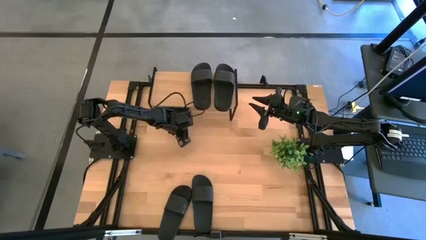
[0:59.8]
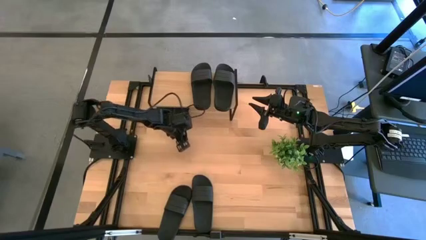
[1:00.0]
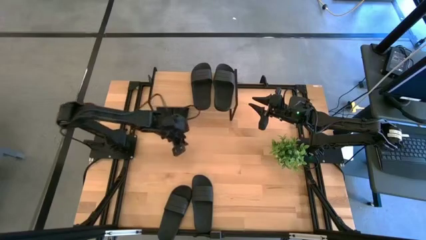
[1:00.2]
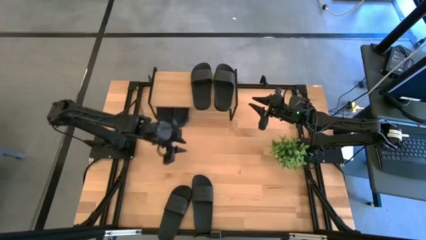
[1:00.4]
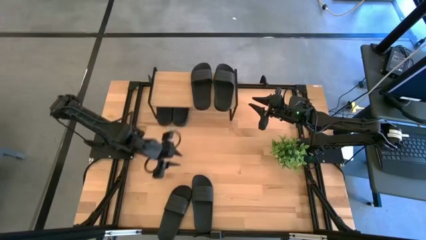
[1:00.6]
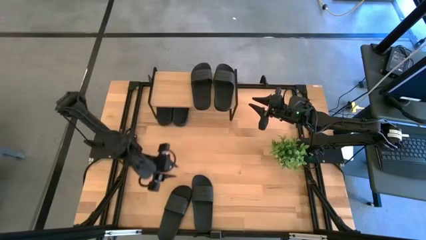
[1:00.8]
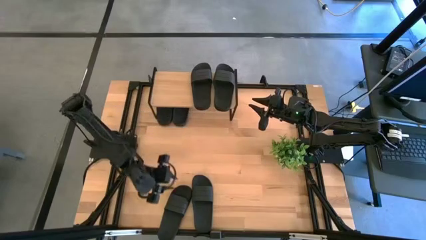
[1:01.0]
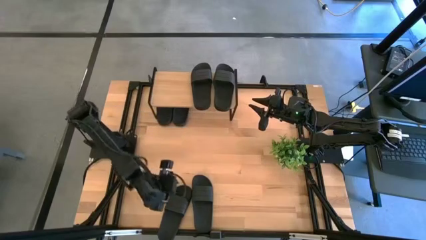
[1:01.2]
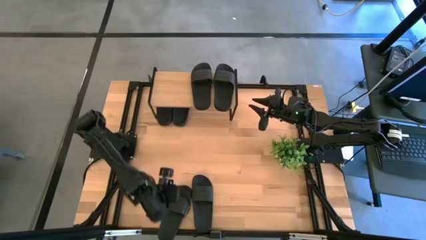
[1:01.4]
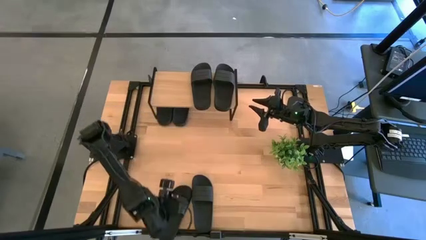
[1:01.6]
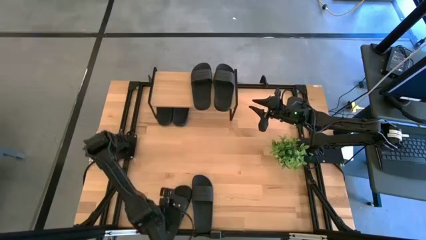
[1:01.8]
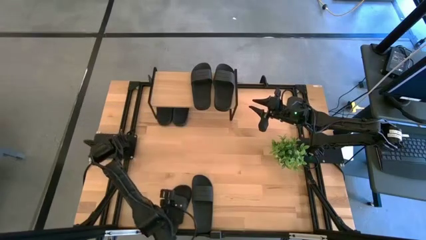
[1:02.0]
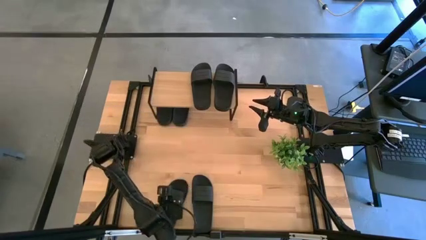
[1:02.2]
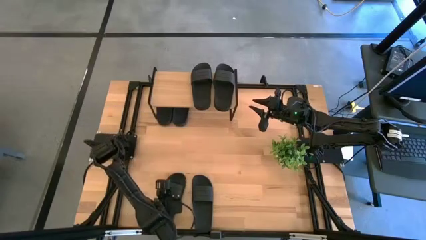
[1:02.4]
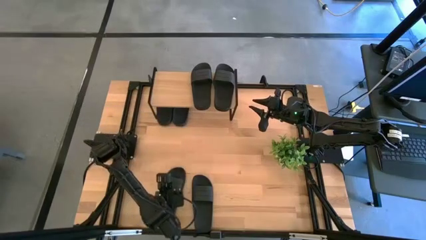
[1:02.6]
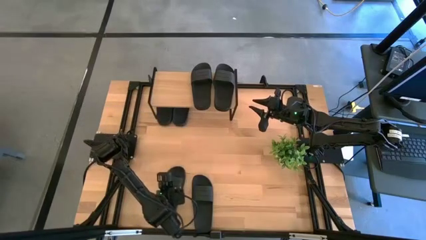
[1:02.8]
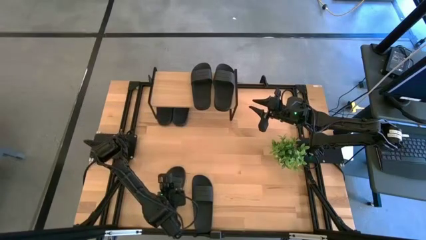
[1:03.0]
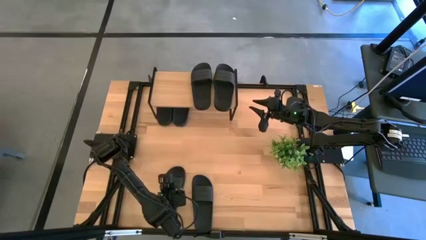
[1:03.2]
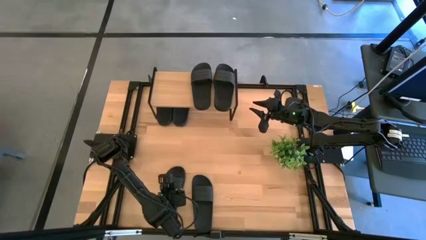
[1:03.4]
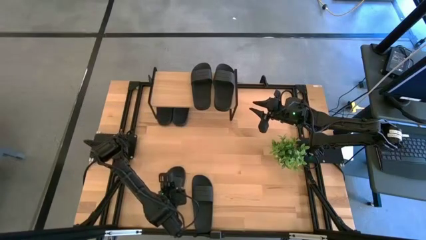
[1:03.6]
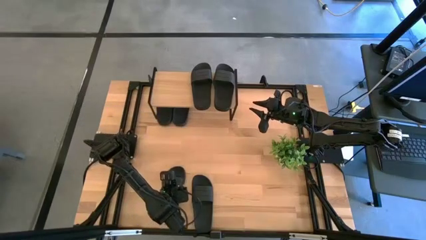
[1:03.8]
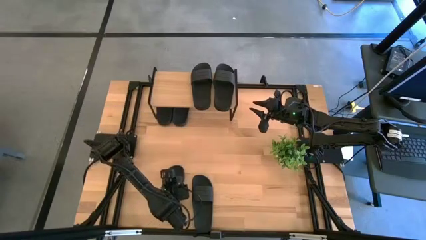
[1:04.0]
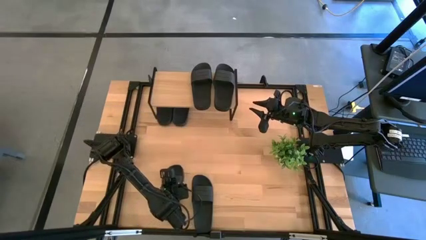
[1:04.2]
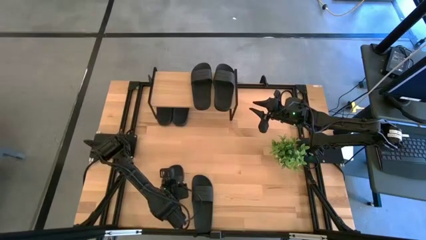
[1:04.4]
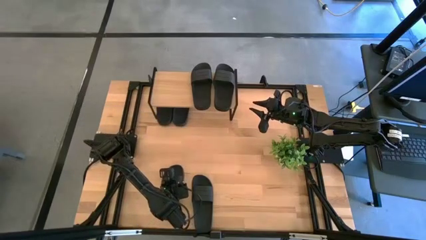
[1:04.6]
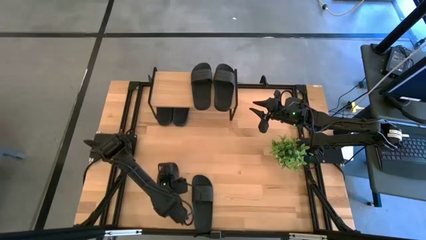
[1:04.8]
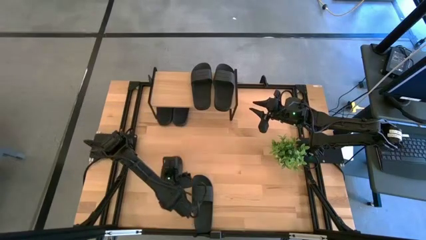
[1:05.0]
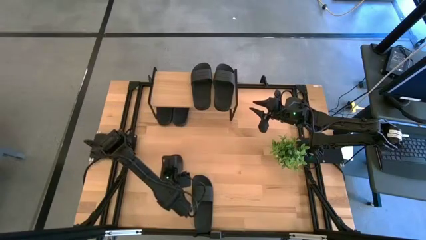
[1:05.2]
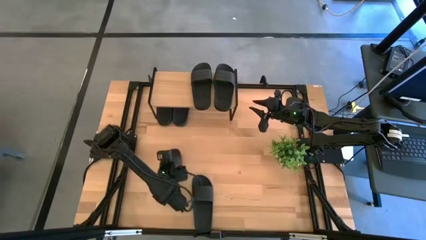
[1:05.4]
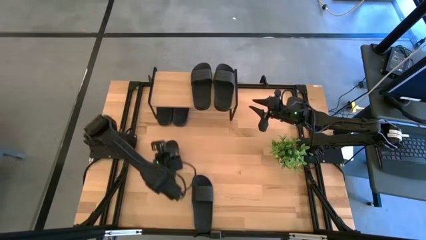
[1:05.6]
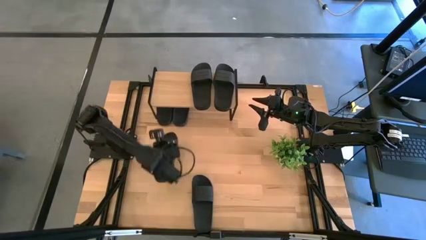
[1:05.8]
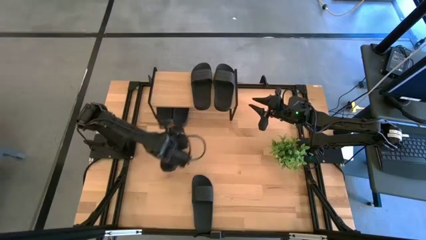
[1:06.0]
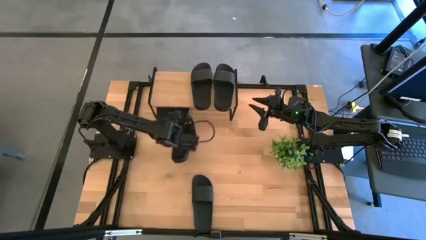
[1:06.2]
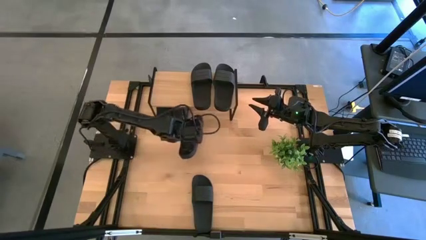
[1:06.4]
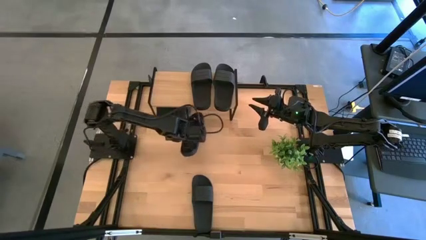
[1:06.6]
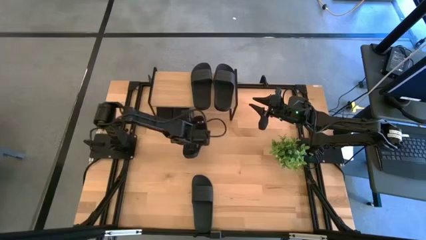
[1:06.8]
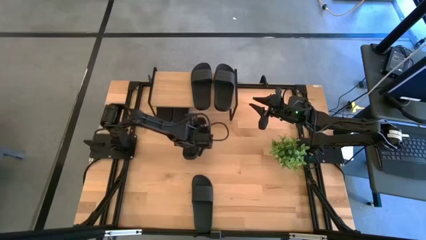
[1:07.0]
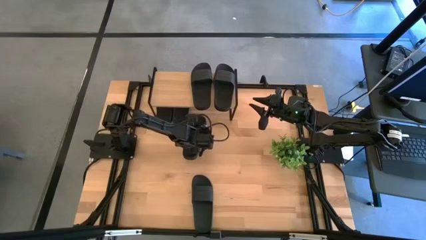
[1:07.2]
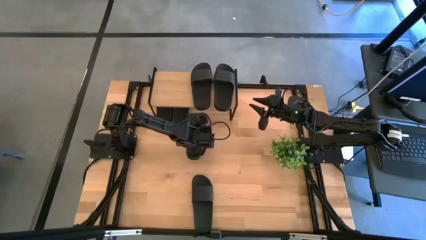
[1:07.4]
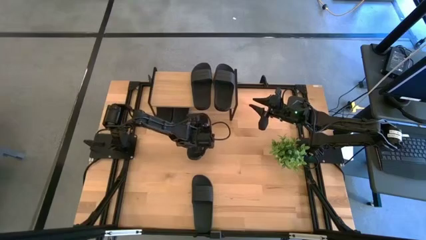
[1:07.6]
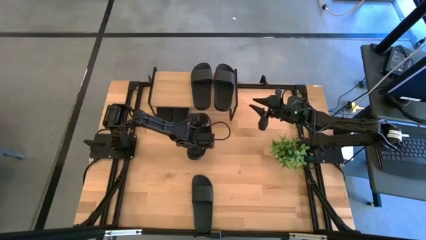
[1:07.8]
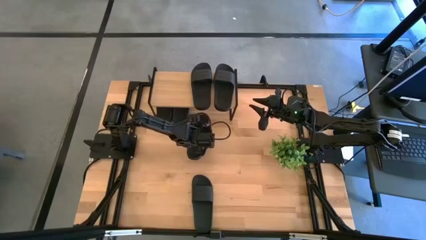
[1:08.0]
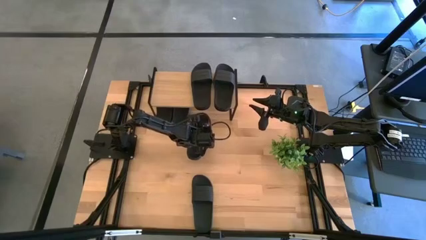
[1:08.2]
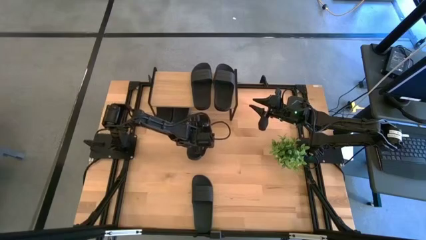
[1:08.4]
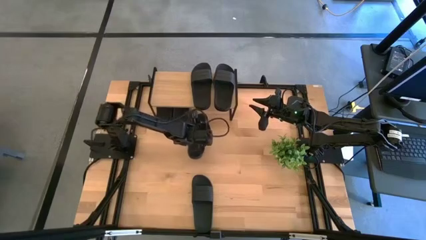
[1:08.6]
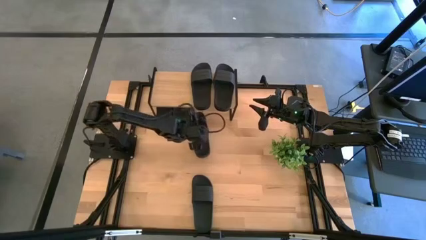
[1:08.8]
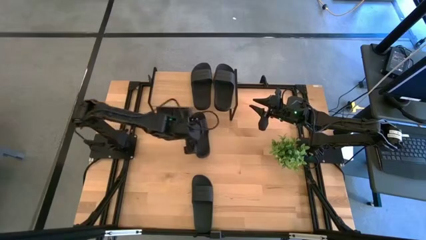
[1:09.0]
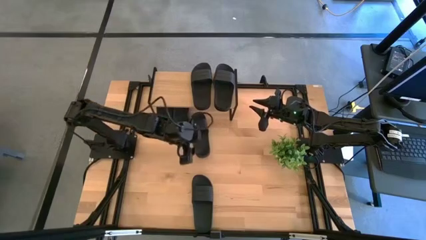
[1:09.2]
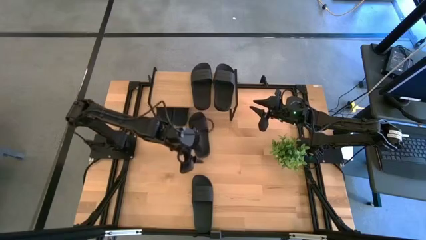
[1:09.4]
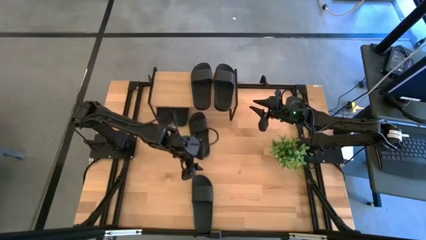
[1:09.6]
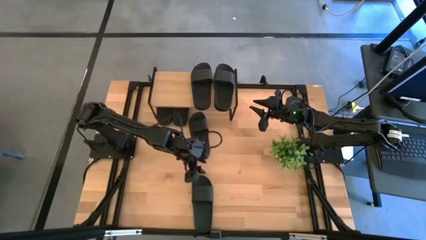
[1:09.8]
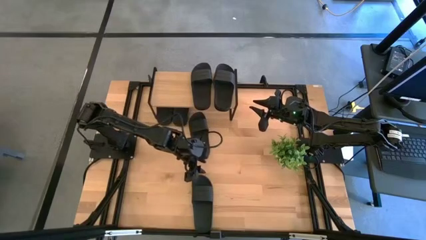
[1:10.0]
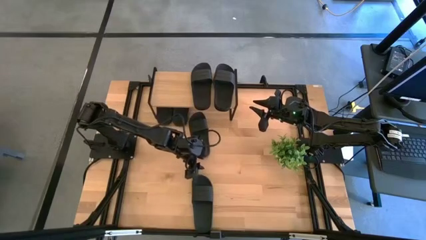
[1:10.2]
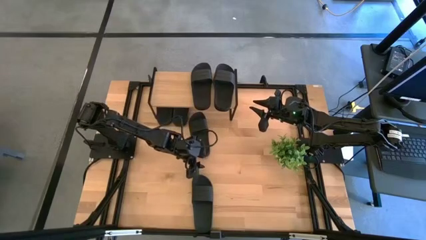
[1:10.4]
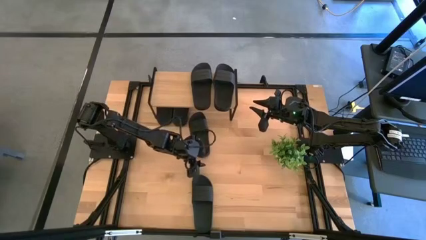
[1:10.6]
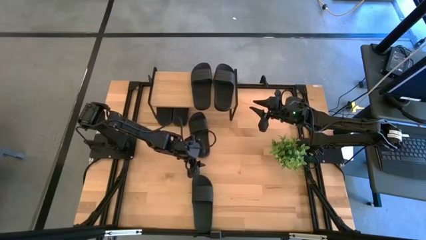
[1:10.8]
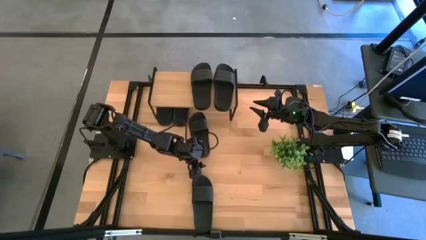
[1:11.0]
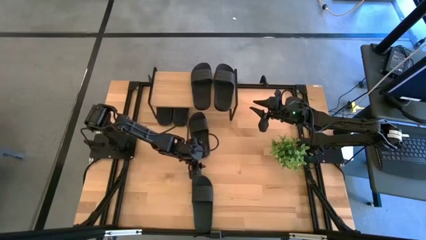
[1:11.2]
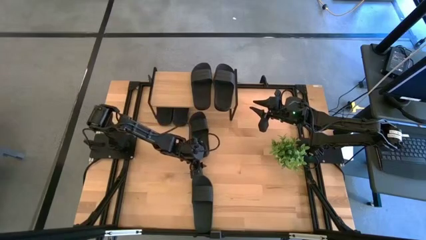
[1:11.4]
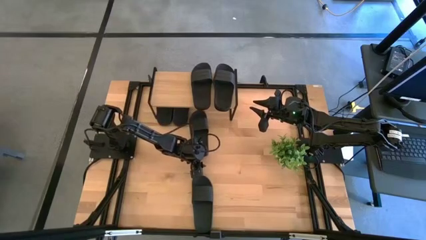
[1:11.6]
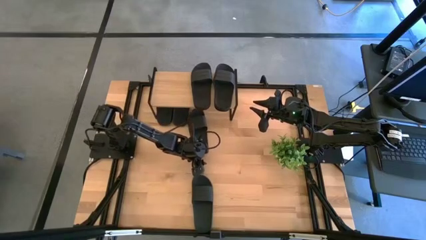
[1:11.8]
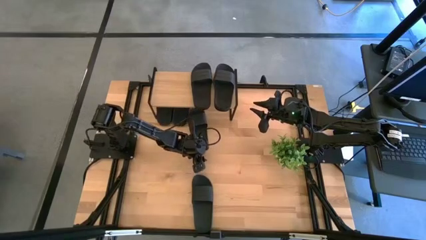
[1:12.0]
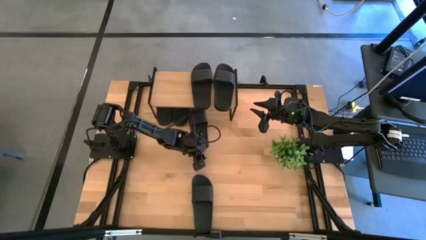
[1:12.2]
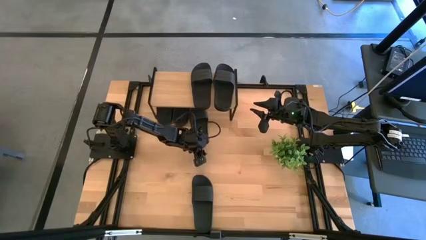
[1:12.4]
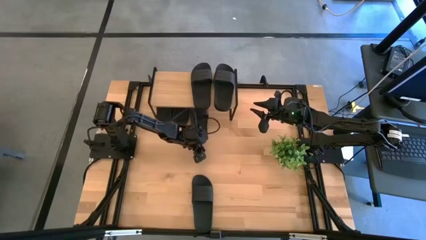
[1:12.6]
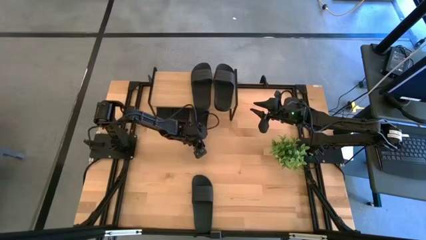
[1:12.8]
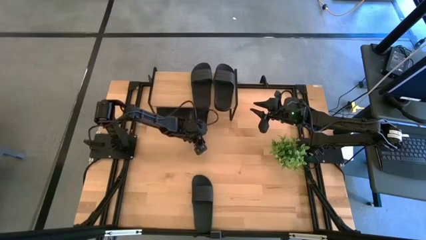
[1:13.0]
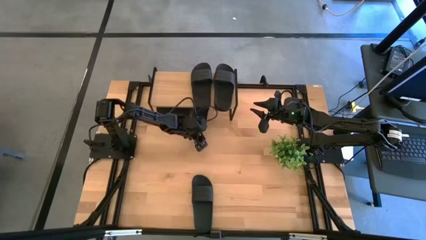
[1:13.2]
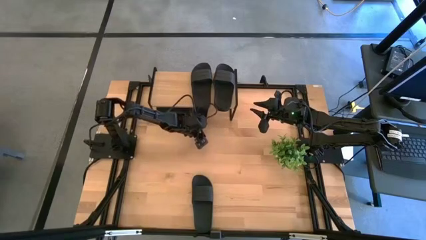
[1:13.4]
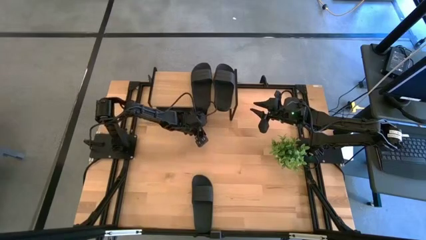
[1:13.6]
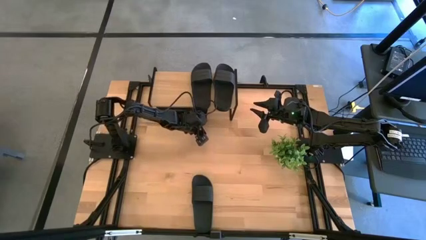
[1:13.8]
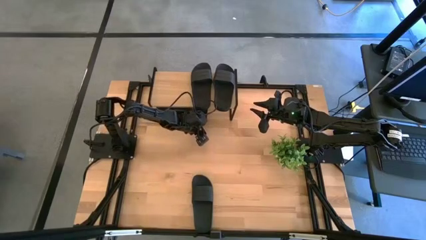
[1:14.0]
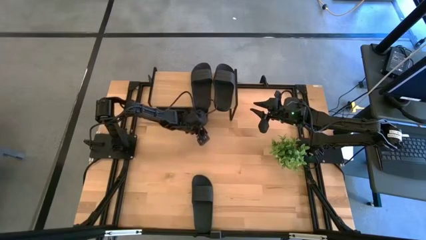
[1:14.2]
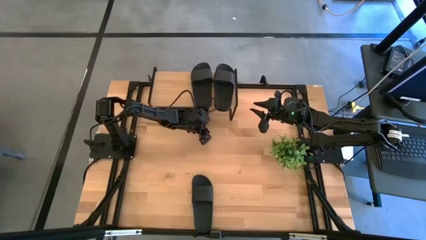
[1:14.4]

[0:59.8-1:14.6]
Task: Pick and place slides into the shelf
Put the black slipper under the shelf

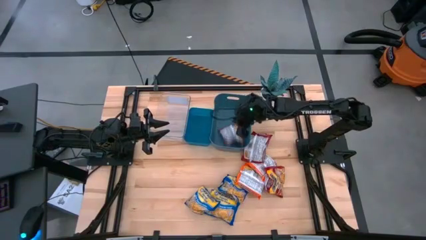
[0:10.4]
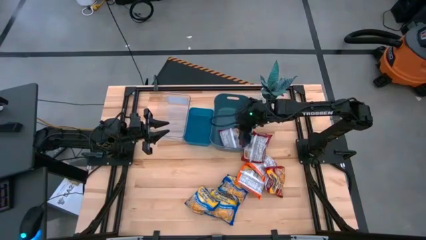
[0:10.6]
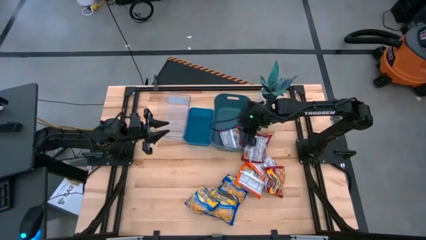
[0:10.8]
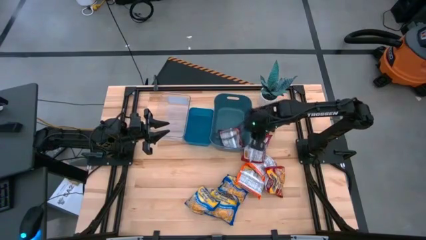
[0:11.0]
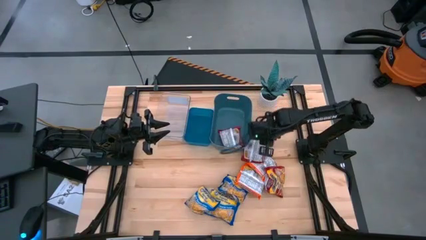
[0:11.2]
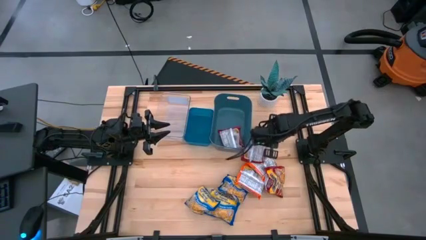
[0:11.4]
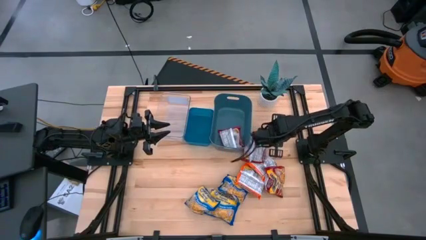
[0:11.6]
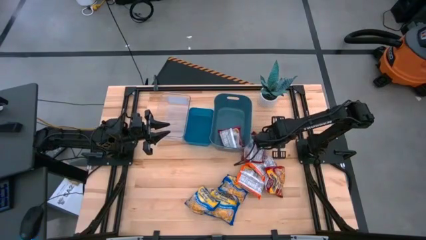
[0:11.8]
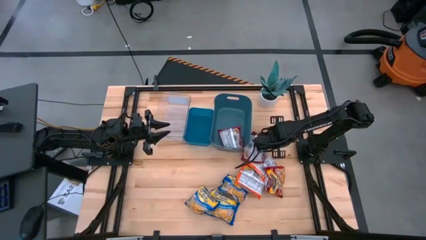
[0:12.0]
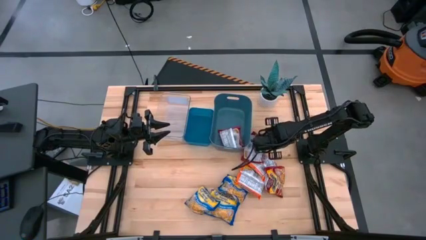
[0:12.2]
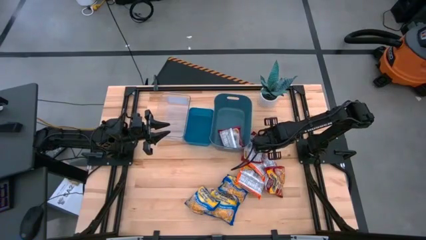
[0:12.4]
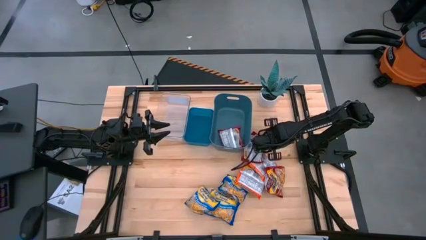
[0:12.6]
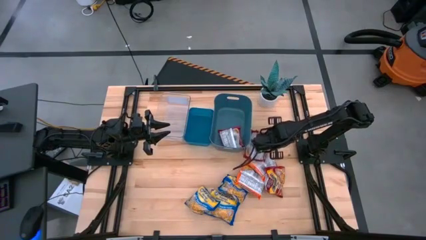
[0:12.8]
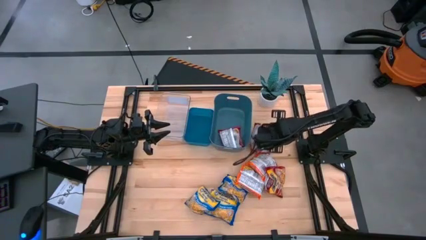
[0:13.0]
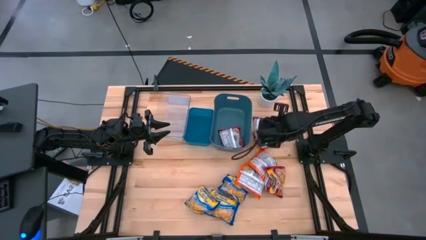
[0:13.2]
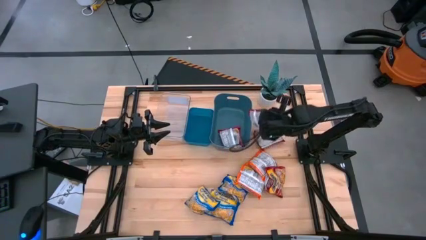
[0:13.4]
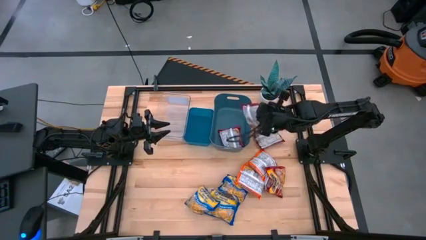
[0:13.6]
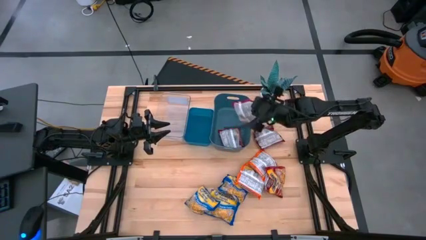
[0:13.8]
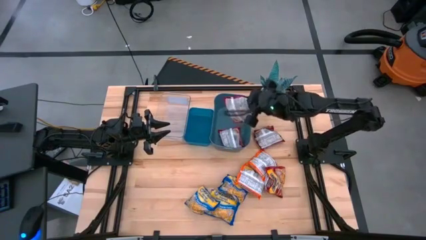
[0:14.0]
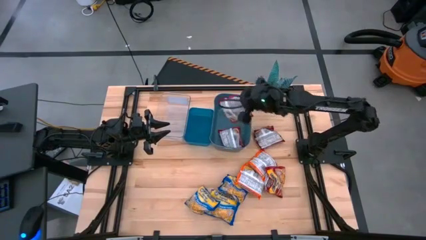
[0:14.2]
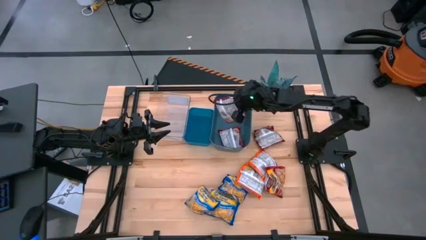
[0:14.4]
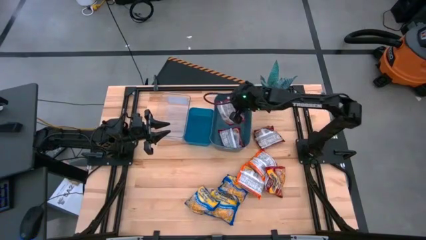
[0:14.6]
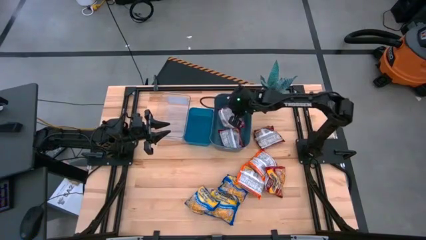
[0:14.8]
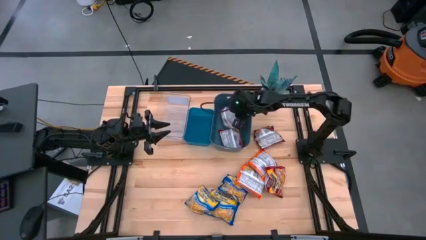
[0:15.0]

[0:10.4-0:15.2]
Task: Sort Maruchan noodles
Put the red noodle pack into the green bin
